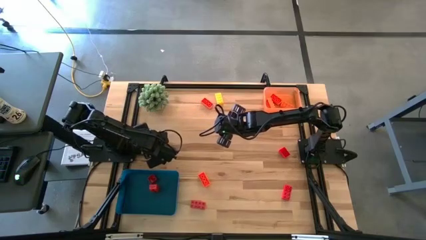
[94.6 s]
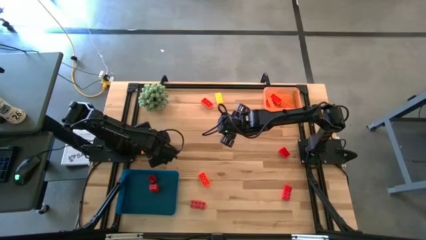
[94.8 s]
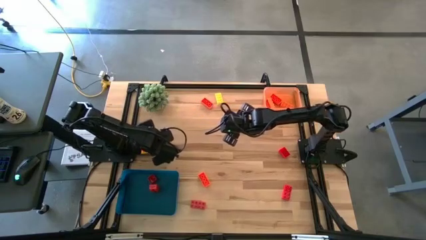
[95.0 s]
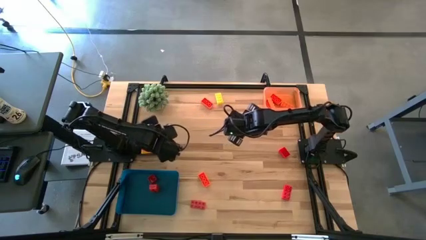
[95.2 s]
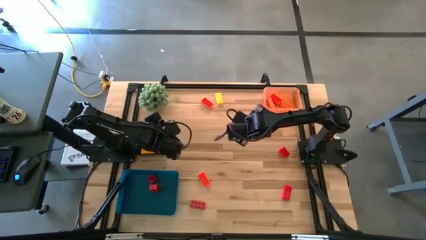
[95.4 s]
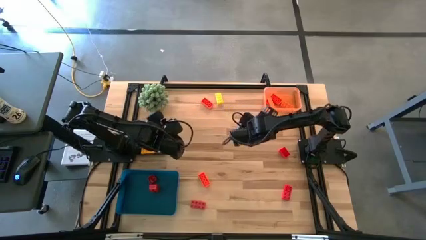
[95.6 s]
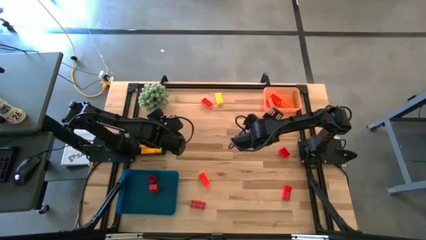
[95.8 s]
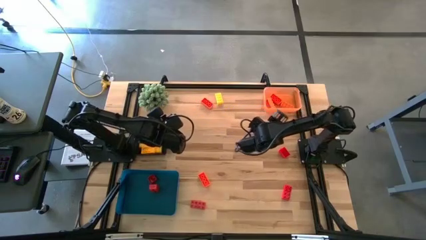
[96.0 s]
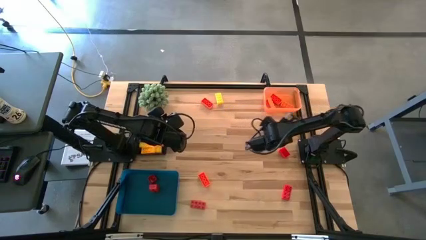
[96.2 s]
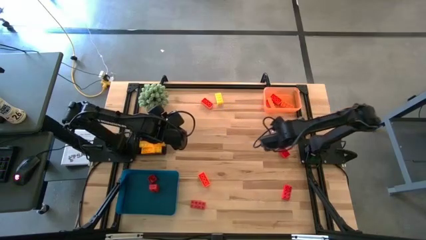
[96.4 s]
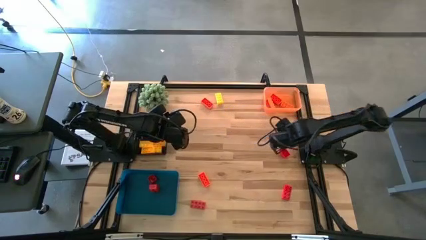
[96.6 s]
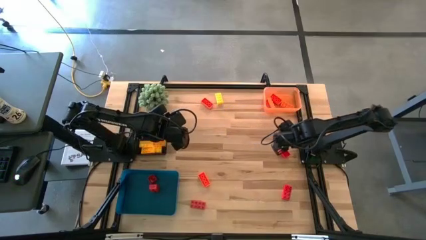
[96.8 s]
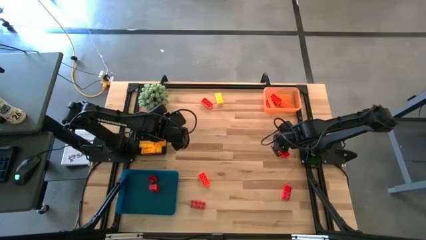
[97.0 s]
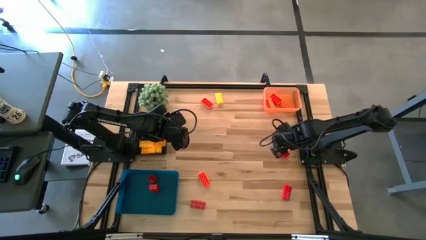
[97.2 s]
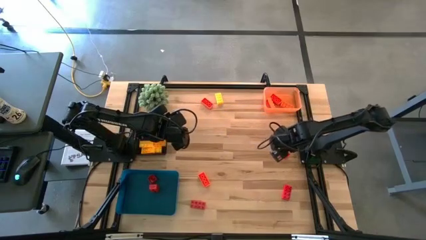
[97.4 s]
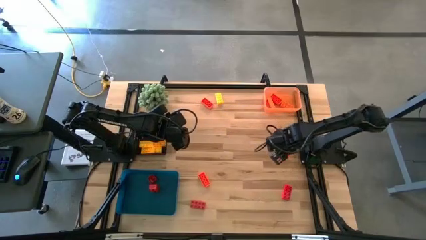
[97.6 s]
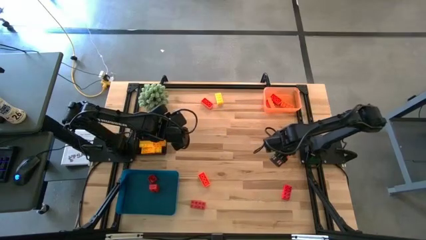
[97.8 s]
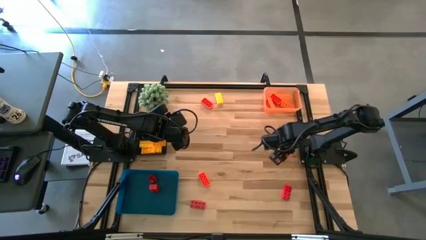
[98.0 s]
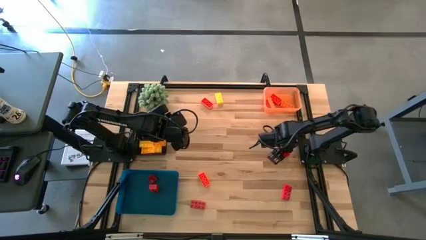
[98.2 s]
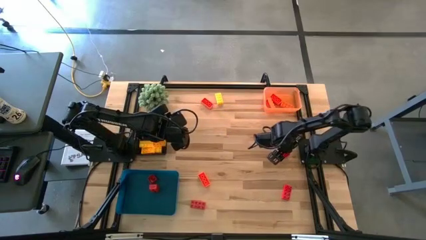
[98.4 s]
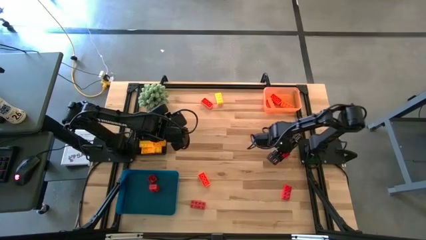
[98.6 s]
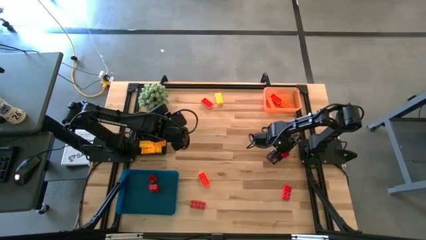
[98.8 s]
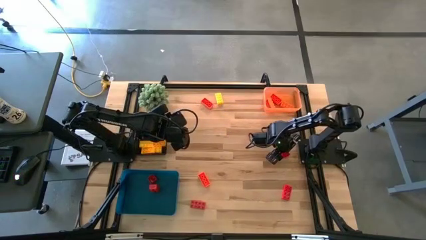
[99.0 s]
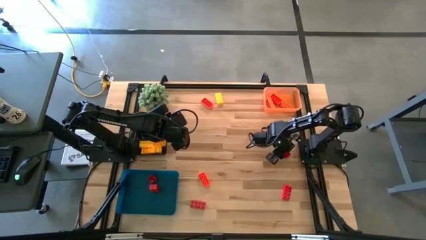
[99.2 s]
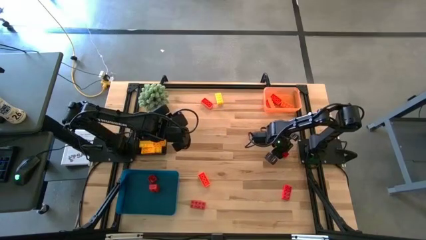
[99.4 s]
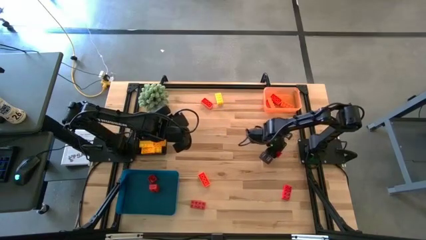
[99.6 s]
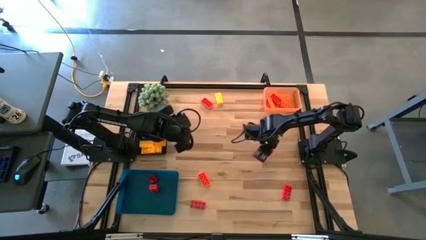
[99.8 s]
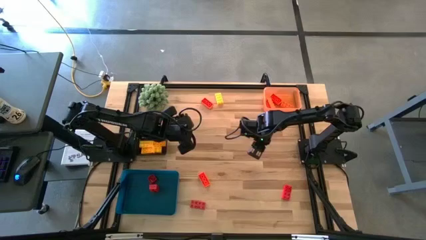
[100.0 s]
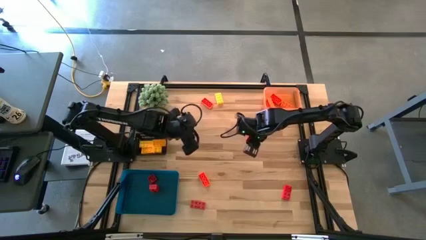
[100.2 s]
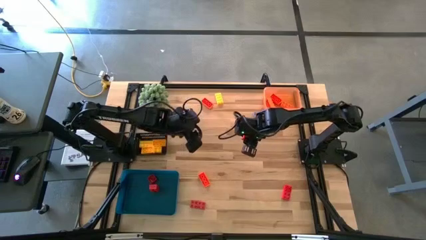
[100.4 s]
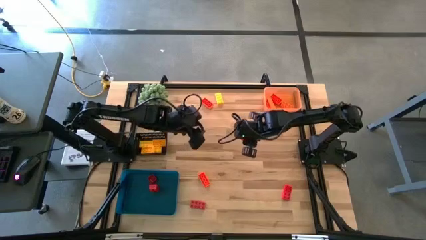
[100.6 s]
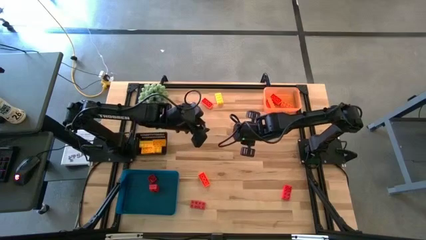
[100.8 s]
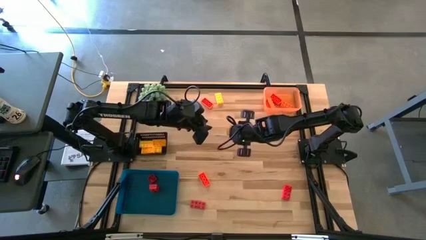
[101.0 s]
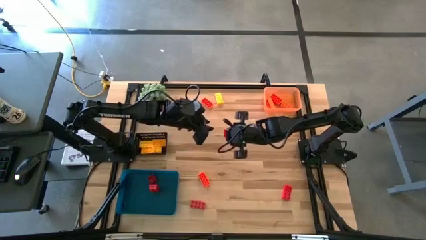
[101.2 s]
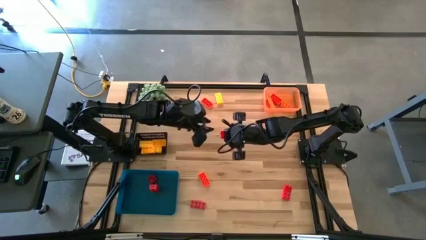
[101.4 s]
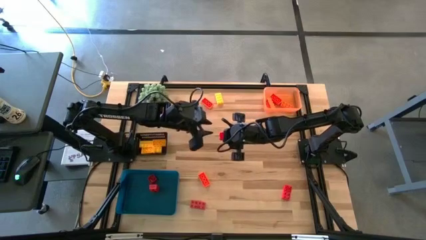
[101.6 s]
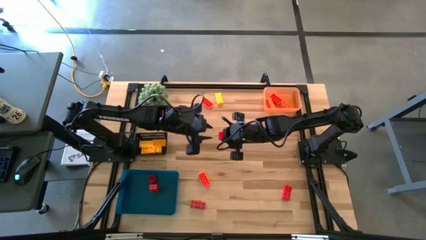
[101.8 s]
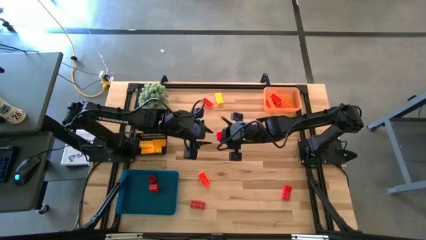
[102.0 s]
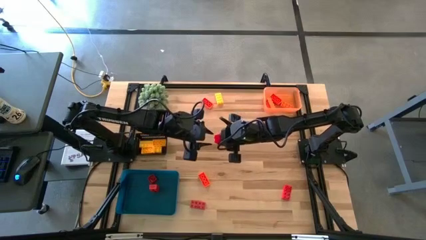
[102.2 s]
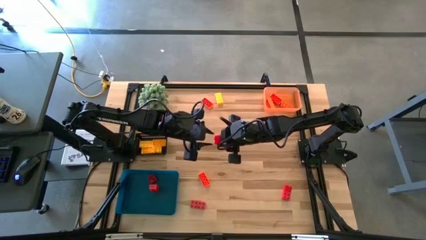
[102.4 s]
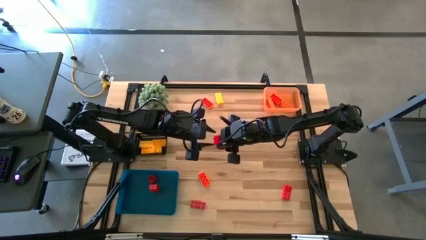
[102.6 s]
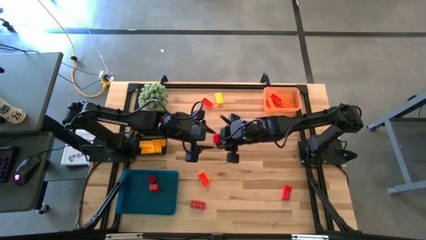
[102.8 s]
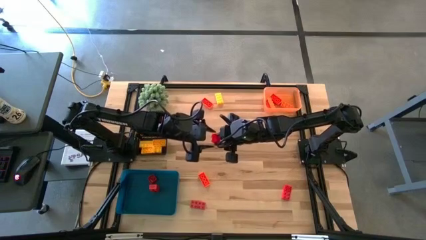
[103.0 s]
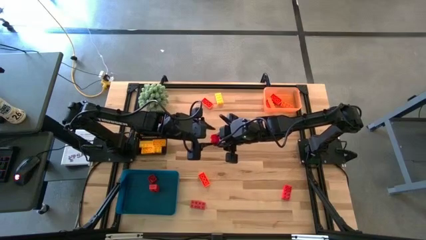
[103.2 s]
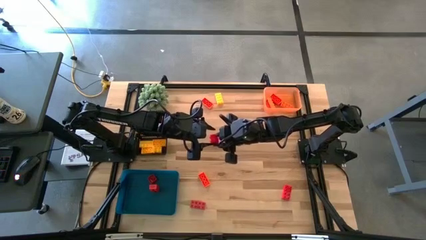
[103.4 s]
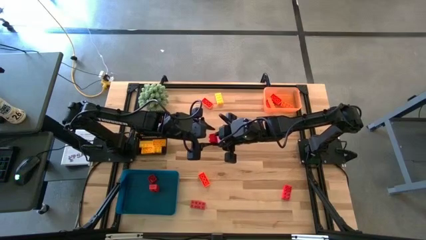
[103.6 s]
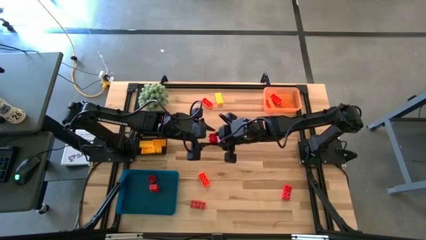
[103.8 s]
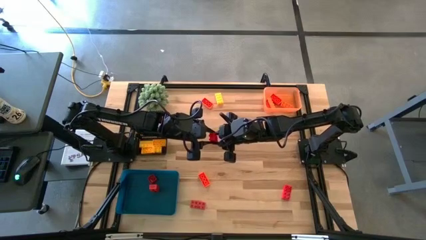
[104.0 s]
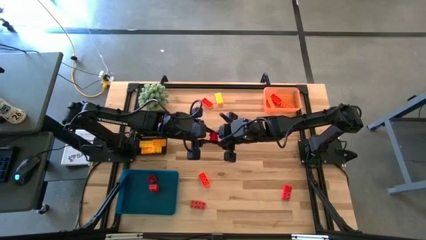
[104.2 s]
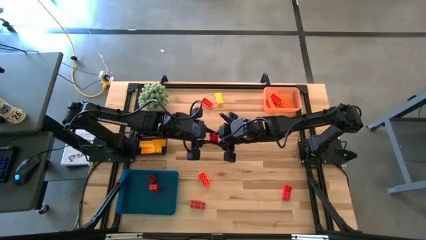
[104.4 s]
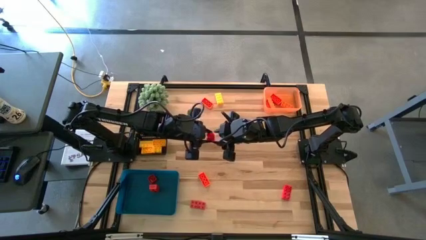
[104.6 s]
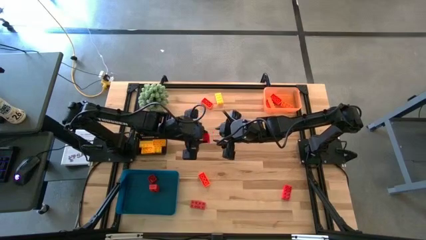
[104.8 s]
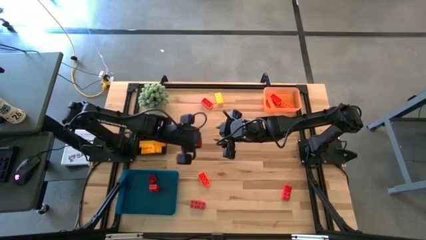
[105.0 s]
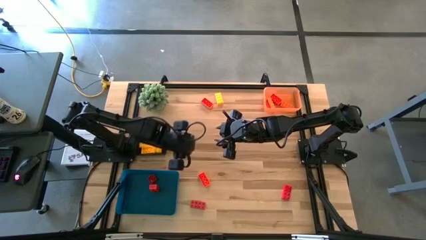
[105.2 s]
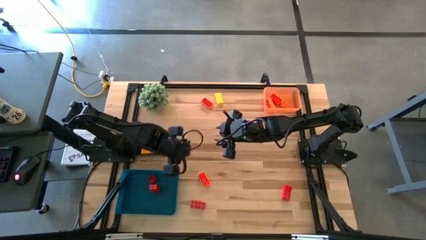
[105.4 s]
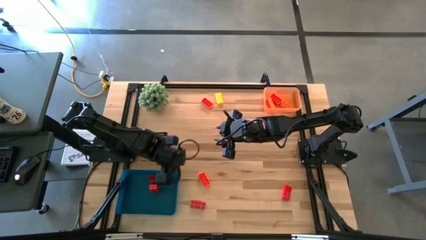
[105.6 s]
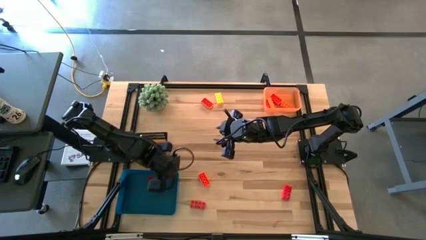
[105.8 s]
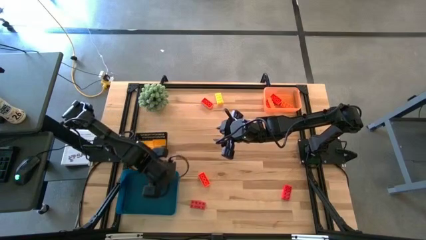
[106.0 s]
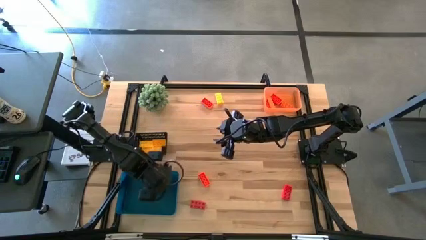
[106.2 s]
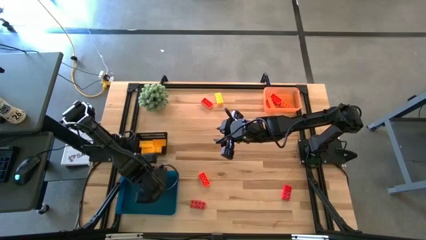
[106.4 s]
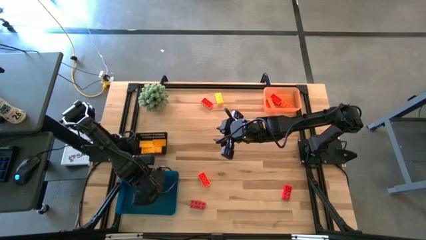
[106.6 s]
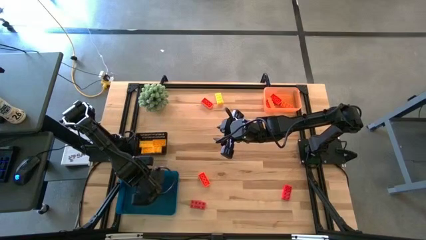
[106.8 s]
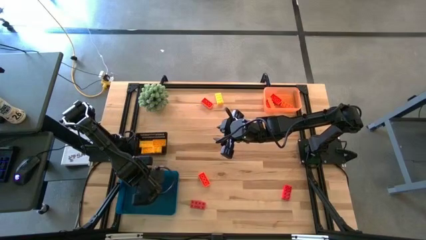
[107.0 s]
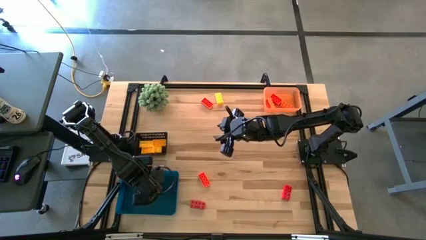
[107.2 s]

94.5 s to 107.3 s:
Task: Sort & place blocks by color
Put the red game piece into the blue bin

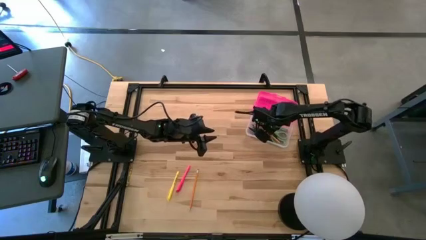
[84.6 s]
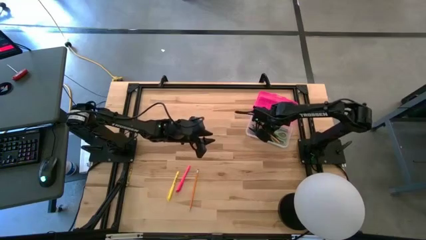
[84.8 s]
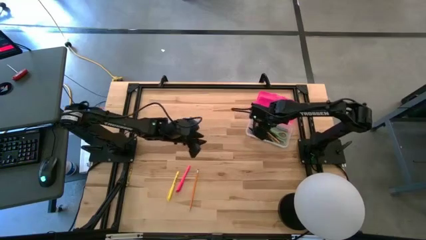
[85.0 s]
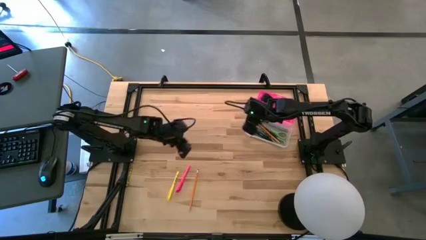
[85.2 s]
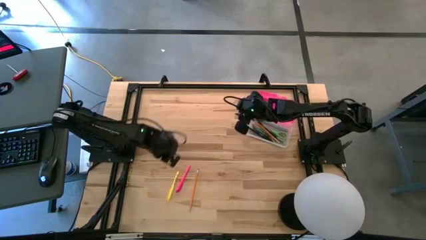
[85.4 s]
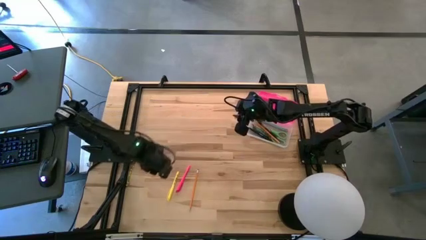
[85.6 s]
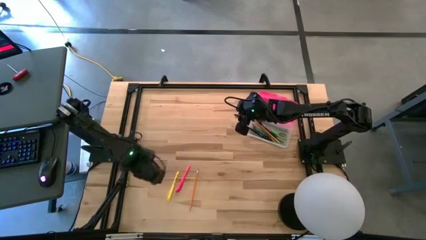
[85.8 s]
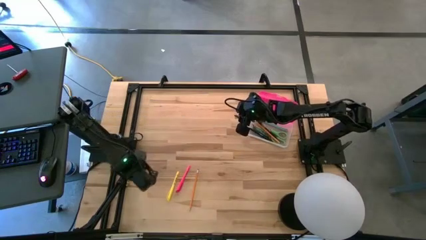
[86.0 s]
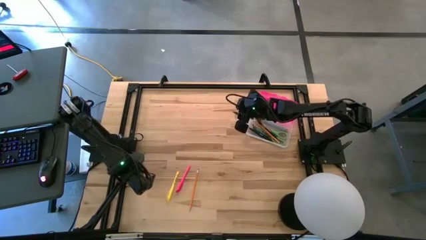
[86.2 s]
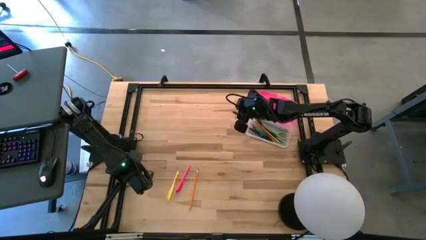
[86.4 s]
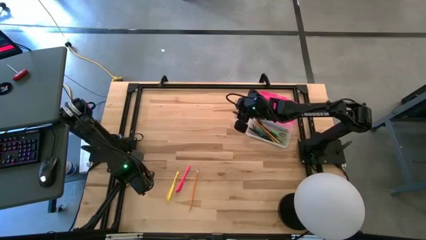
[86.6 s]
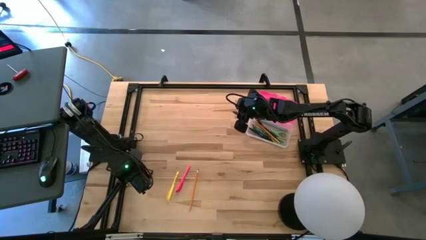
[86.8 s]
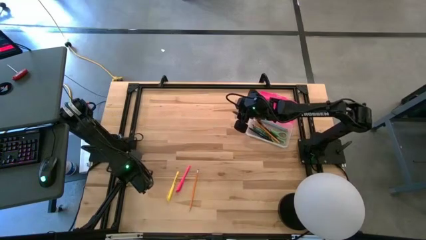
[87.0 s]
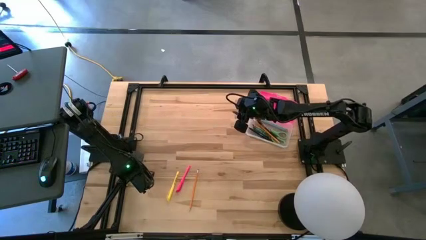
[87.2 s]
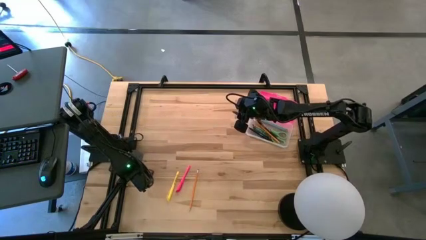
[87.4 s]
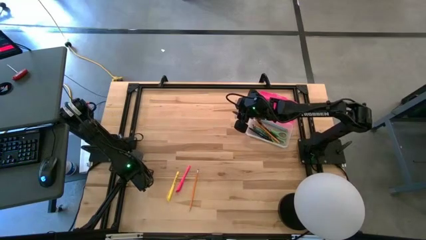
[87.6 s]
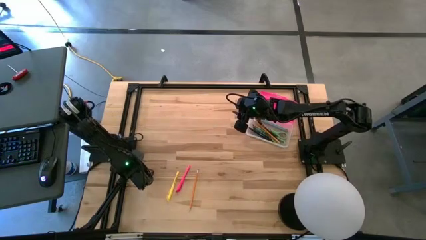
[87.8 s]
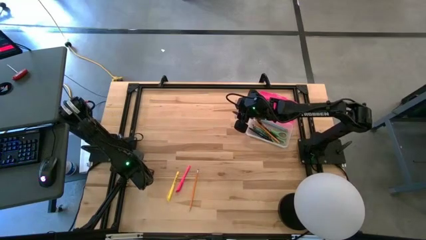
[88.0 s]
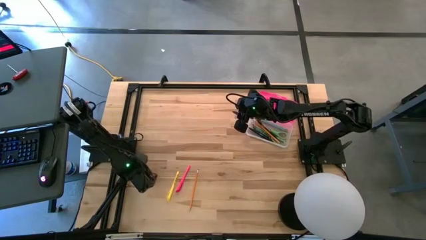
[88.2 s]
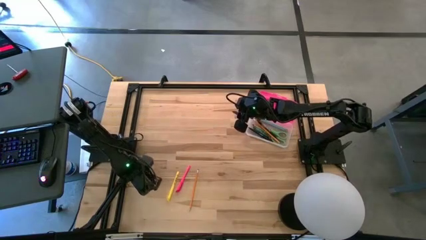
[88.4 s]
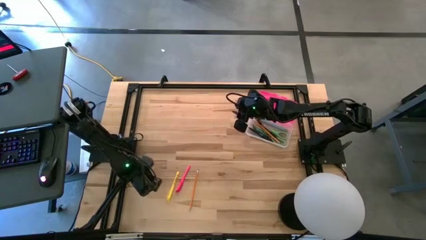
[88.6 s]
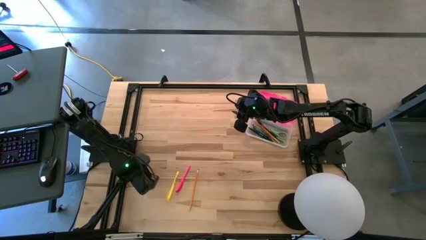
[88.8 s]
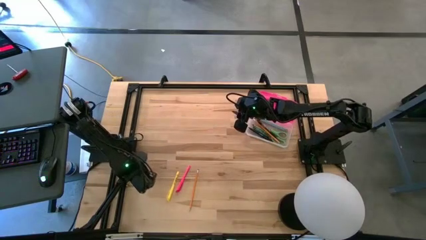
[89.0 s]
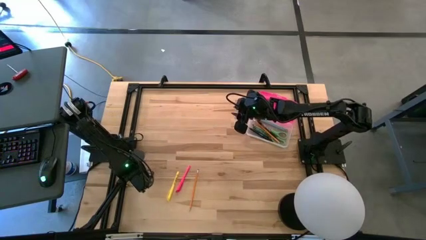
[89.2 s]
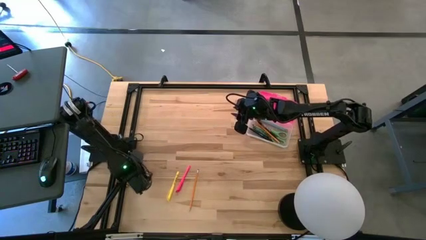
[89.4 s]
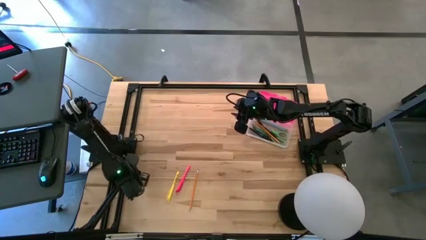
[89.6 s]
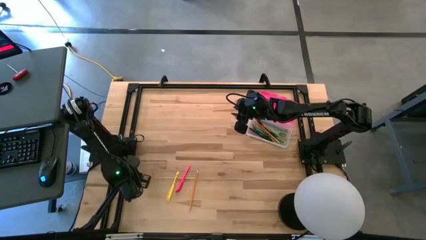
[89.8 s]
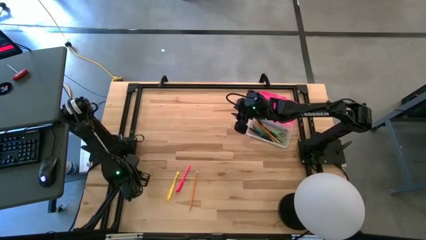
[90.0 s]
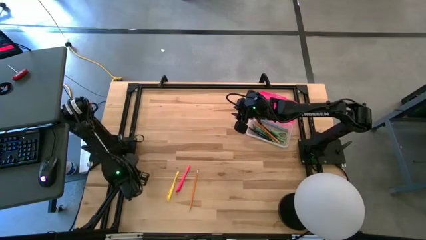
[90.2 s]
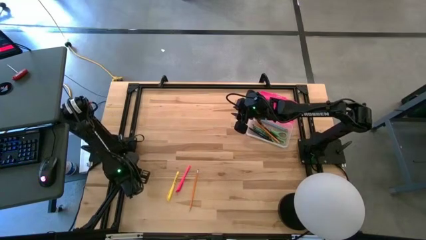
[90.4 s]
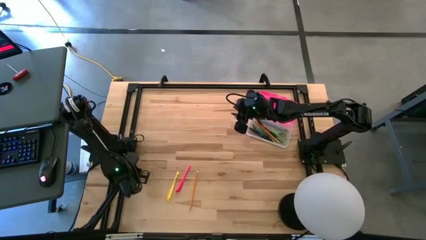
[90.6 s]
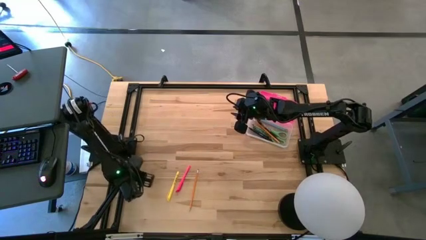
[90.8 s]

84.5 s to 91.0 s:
Task: Pick & place school supplies into a supply box
Adjust the green crayon
